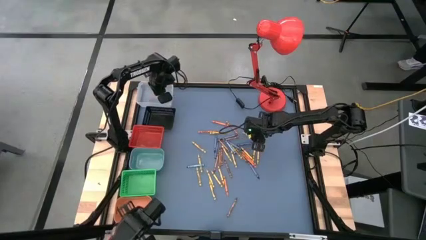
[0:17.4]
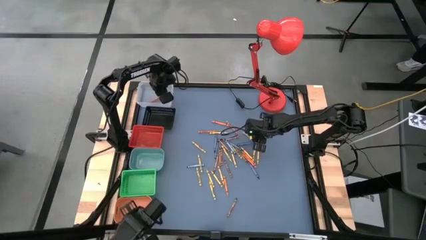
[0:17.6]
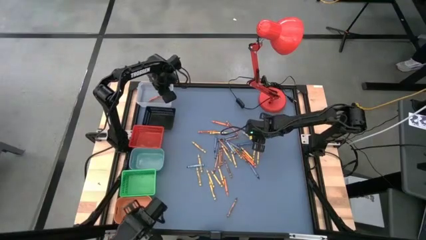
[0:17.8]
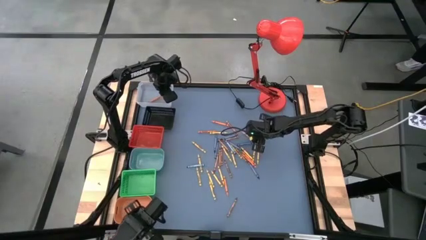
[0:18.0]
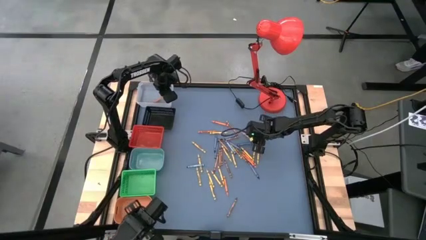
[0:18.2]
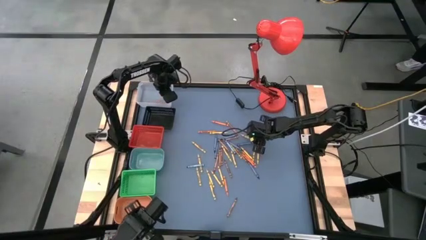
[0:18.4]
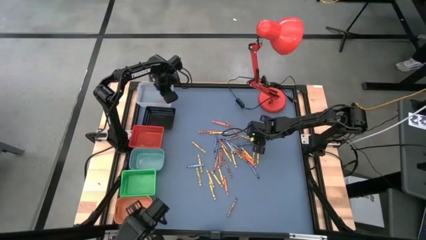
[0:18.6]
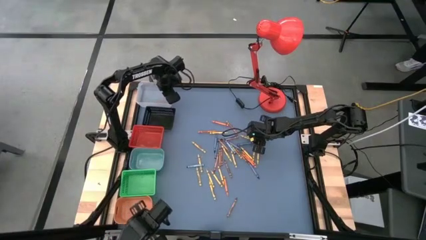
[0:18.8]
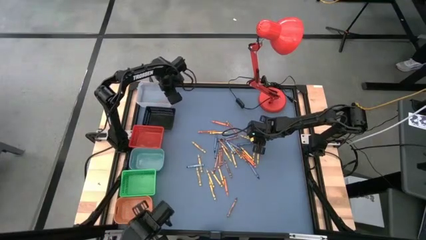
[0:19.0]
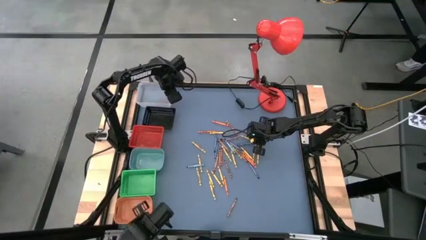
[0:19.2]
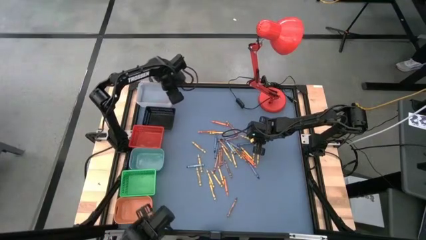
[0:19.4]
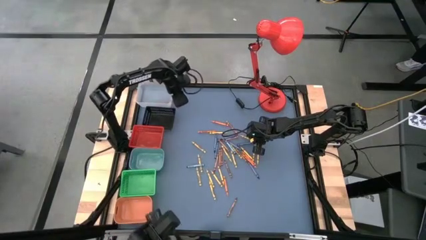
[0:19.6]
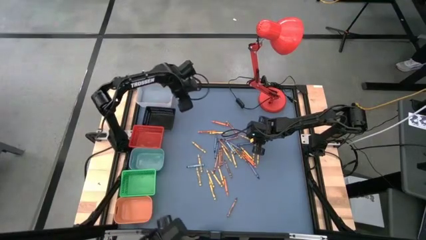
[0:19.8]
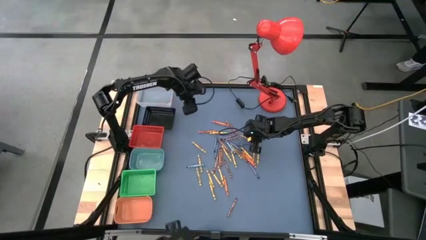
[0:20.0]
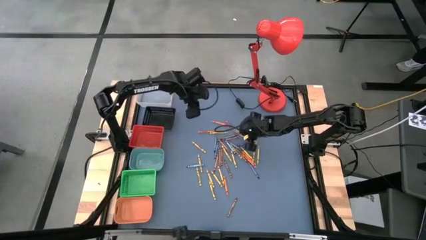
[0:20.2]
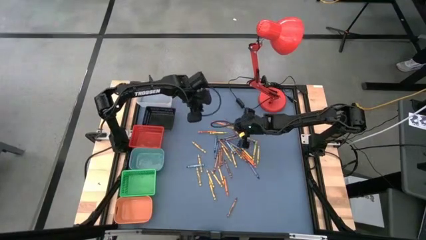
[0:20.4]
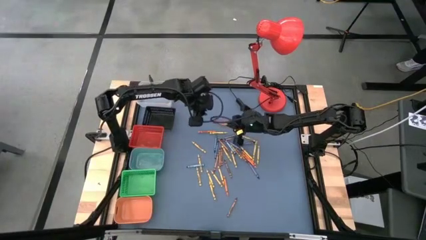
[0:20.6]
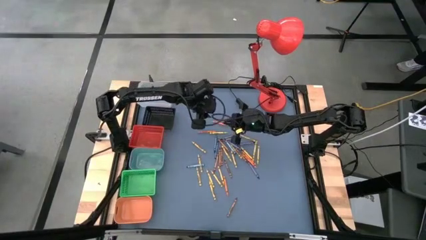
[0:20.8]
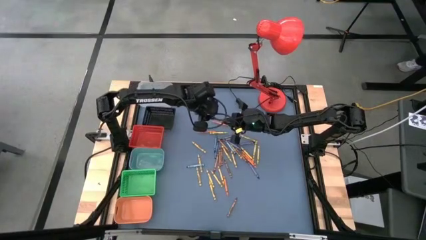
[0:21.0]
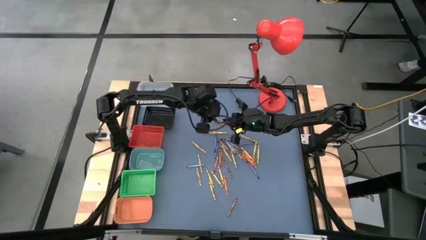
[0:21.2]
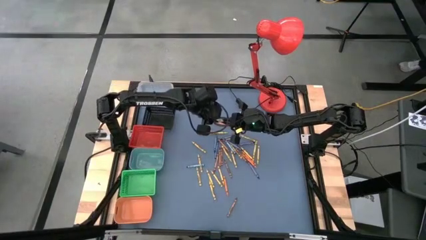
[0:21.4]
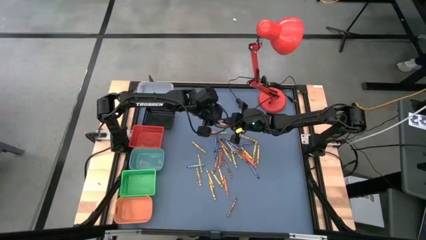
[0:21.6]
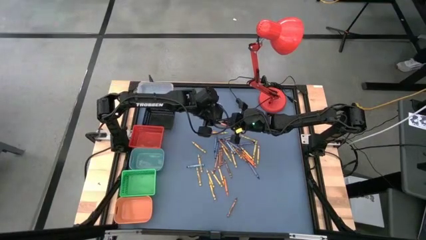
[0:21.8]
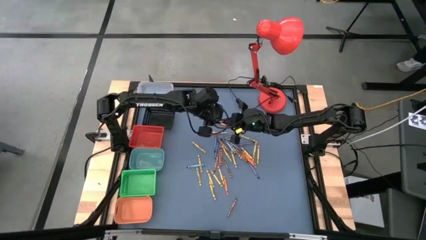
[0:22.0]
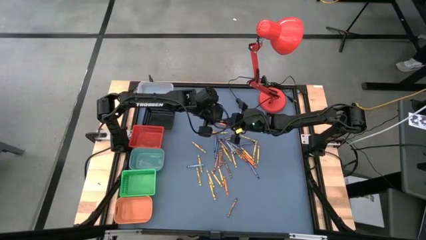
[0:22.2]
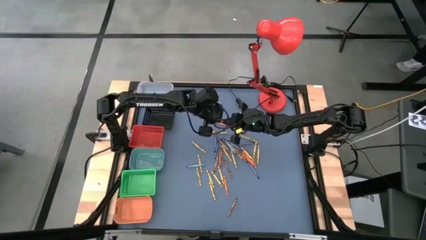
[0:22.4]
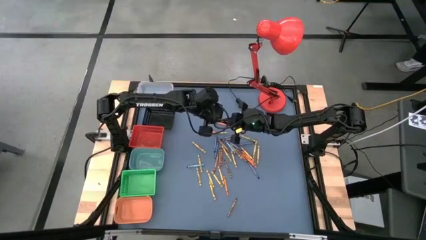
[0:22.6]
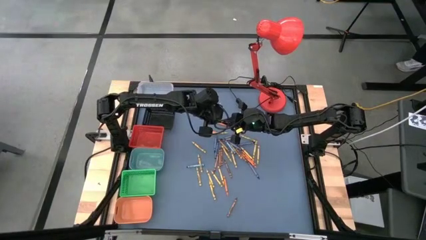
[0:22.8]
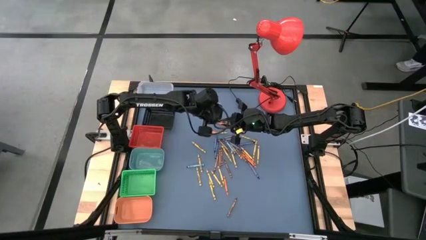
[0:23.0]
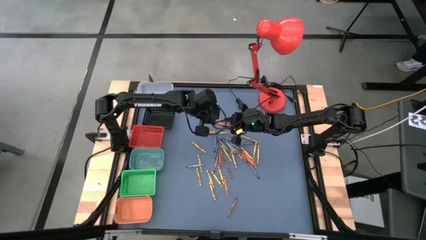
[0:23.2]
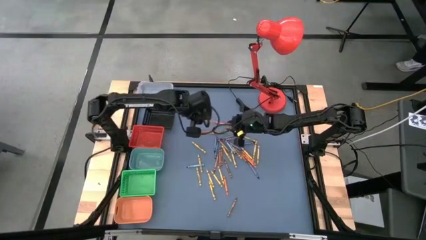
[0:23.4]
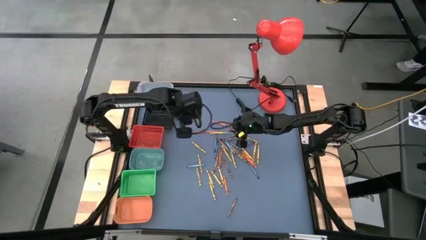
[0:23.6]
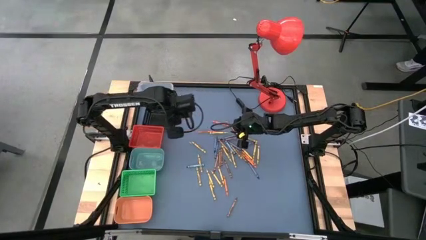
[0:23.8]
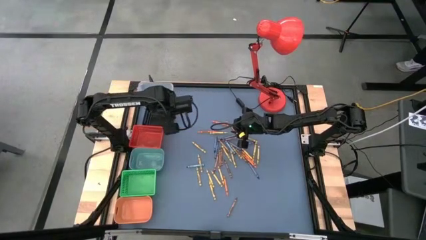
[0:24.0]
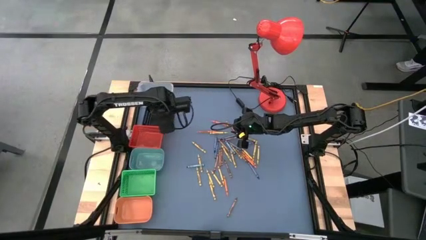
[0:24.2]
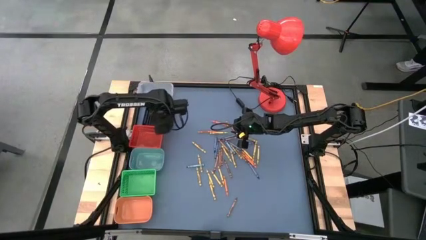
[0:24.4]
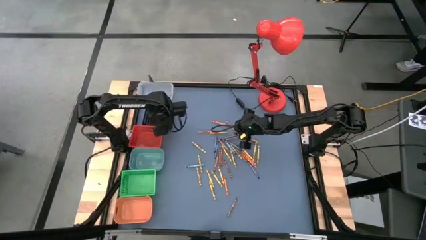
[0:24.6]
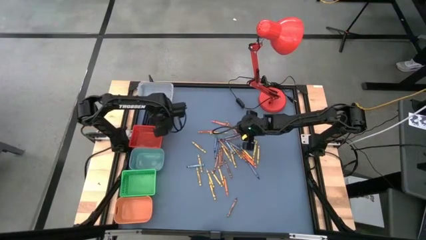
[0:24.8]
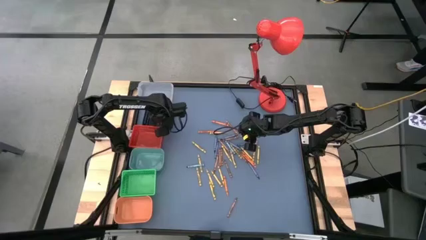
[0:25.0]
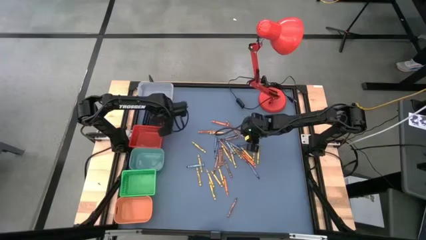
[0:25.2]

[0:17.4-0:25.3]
Task: Sort crayons
Put the green crayon into the black bin

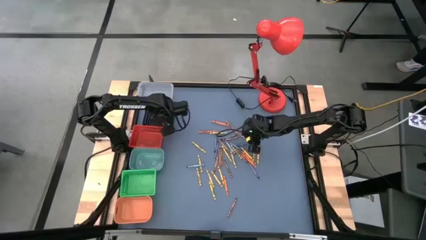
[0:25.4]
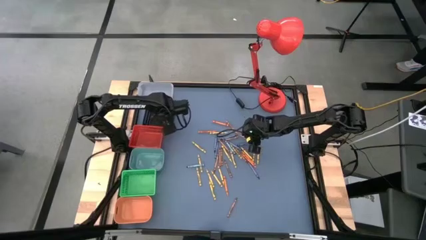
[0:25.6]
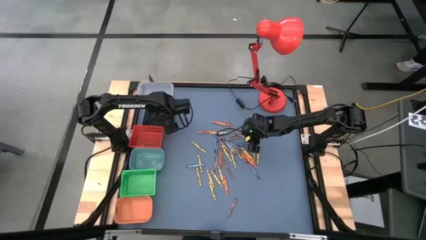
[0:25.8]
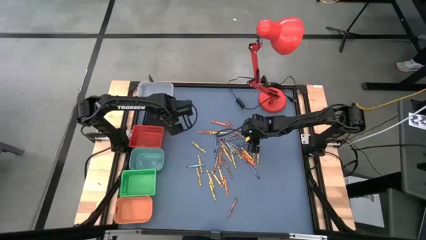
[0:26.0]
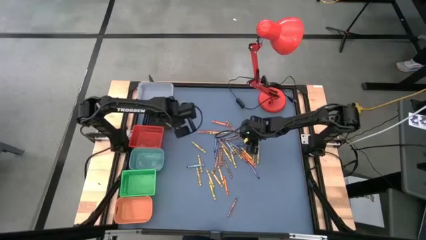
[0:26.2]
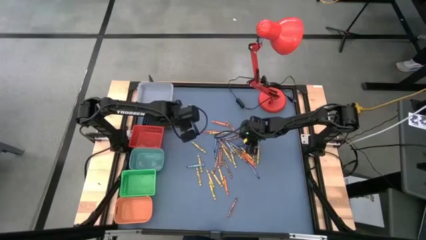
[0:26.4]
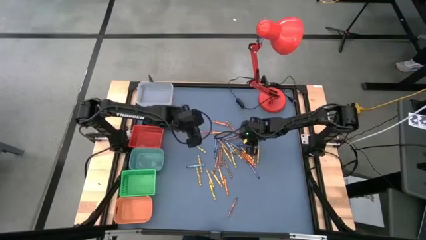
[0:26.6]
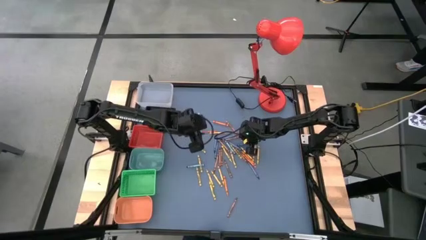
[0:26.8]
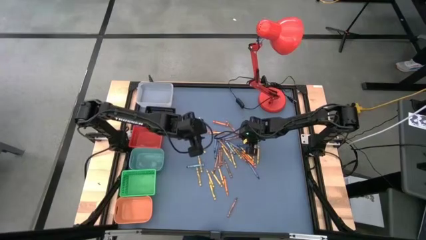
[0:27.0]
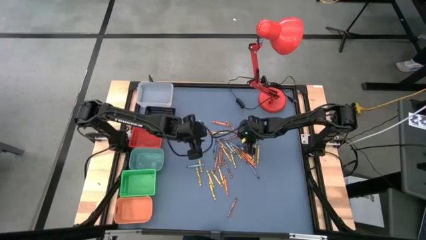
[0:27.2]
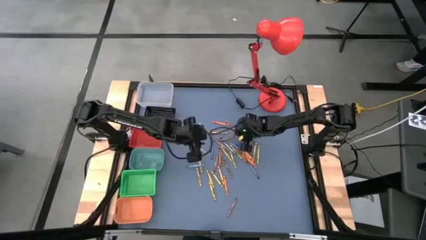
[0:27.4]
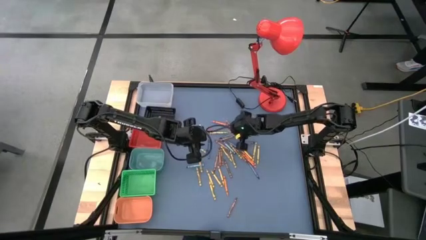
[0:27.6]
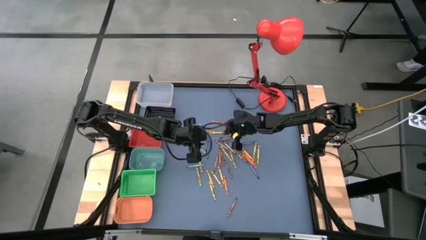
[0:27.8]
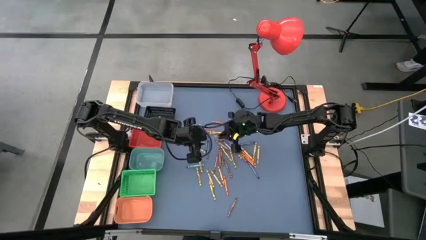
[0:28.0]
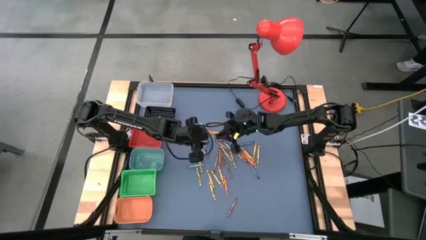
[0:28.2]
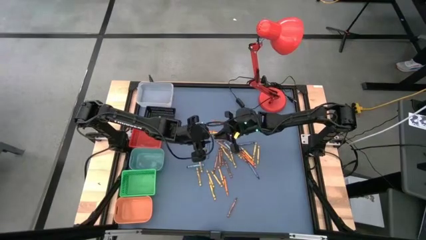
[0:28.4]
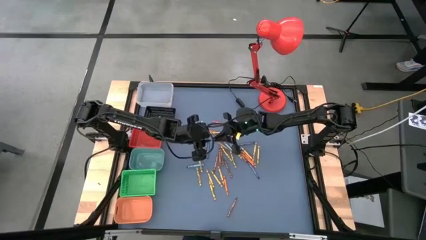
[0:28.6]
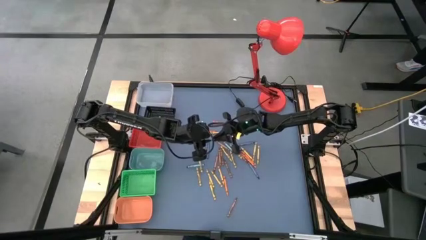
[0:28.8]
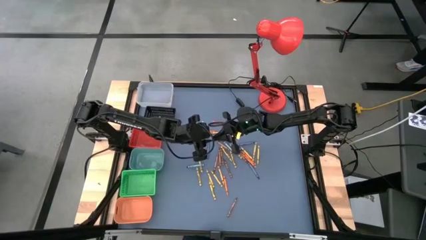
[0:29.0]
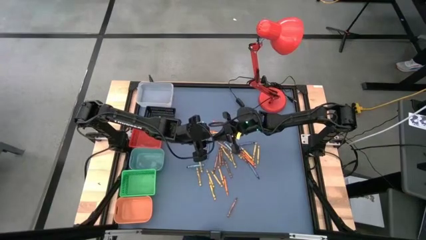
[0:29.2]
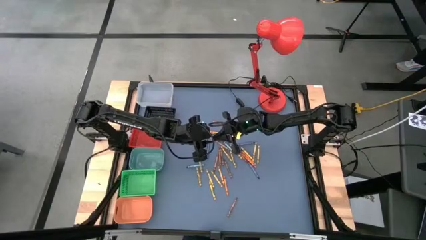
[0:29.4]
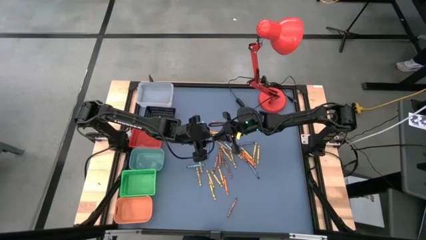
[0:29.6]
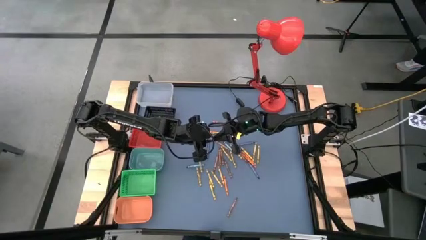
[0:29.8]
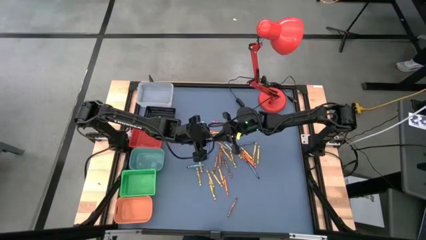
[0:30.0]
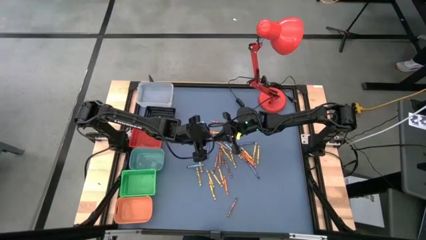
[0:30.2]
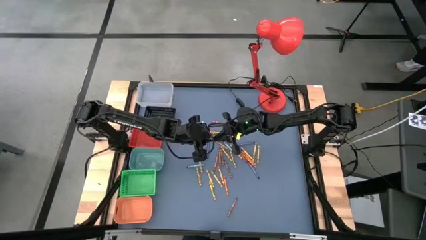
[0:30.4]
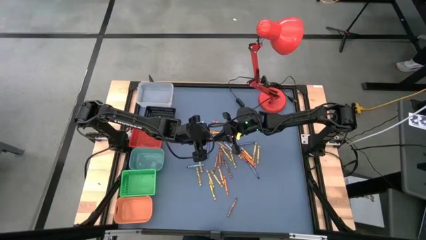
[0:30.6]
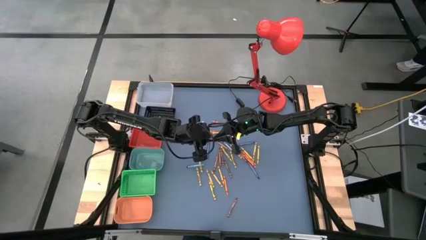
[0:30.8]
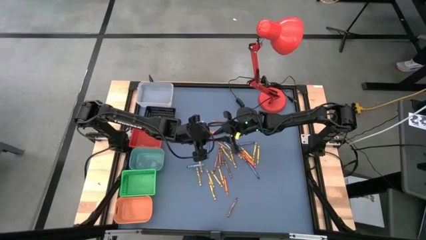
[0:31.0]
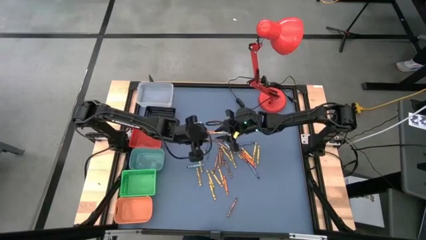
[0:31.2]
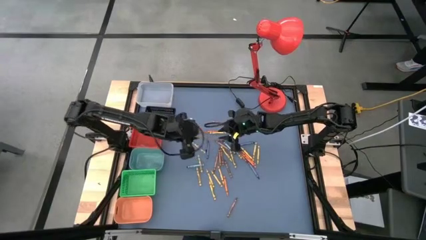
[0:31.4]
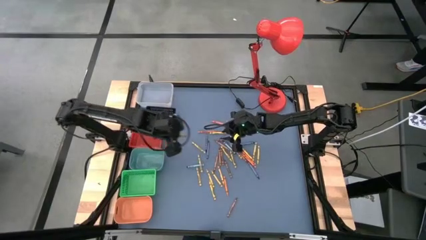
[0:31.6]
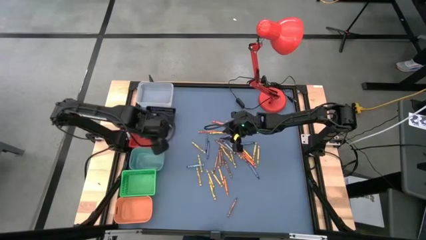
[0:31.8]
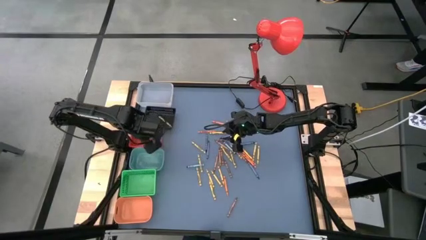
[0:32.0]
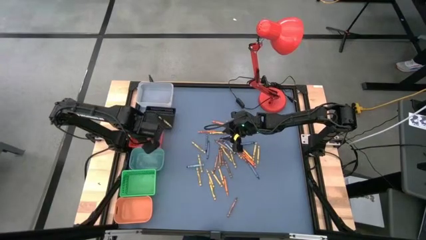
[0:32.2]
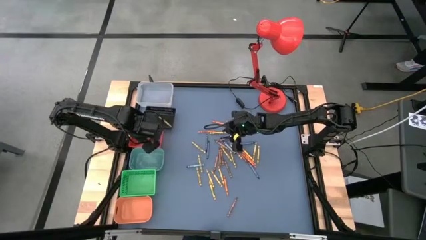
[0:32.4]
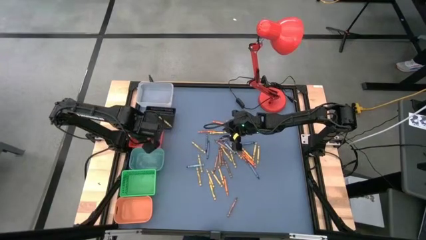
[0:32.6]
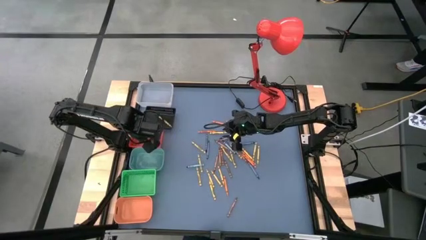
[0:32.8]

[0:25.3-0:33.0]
Put the yellow into the orange bin

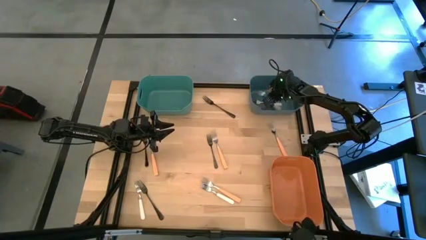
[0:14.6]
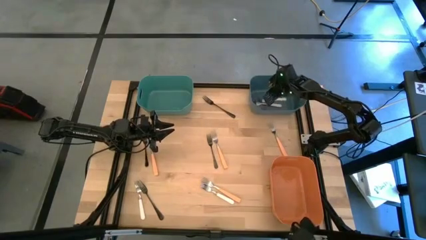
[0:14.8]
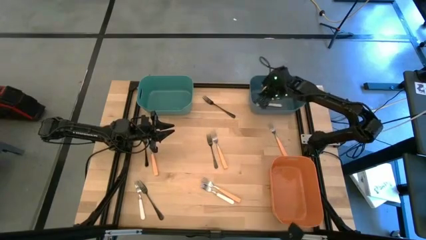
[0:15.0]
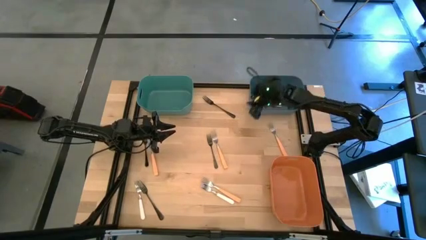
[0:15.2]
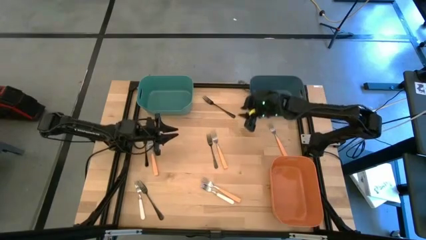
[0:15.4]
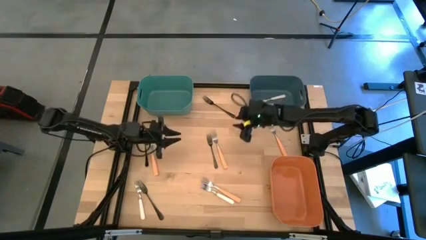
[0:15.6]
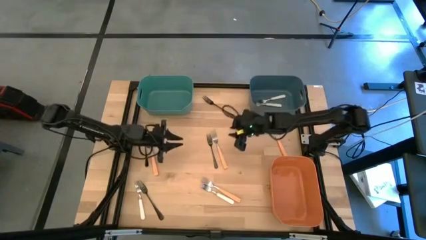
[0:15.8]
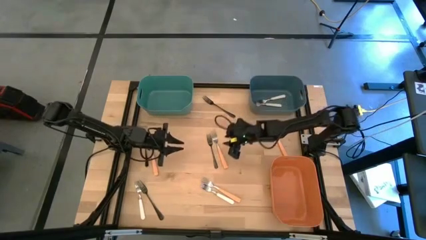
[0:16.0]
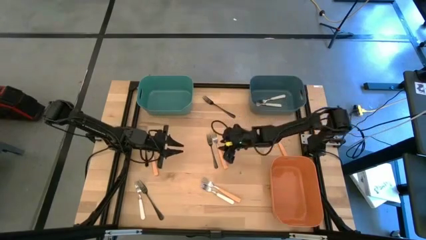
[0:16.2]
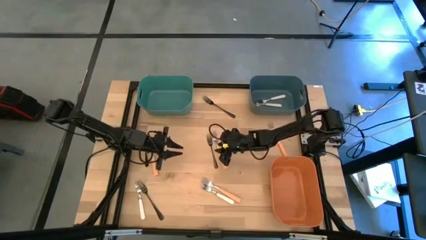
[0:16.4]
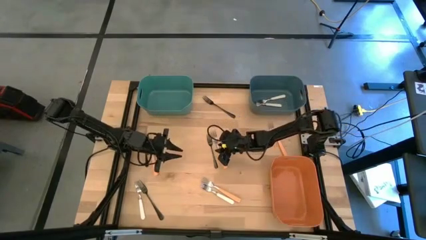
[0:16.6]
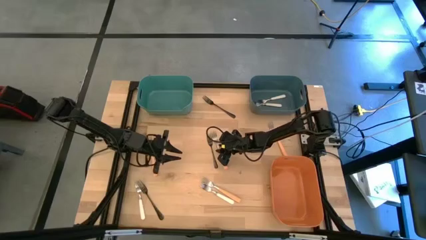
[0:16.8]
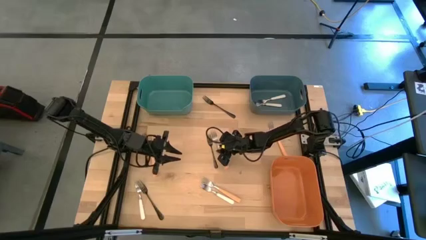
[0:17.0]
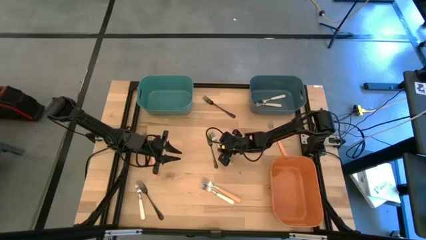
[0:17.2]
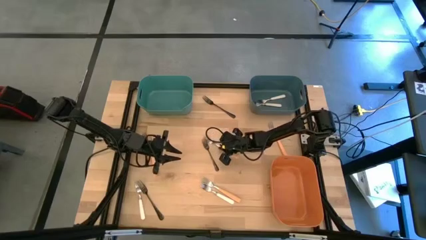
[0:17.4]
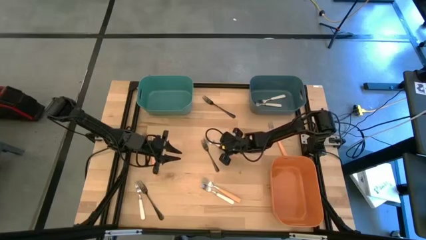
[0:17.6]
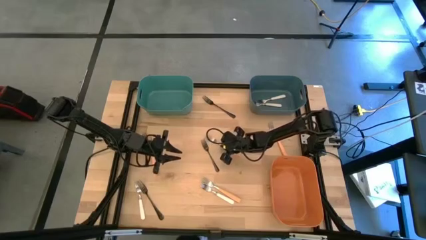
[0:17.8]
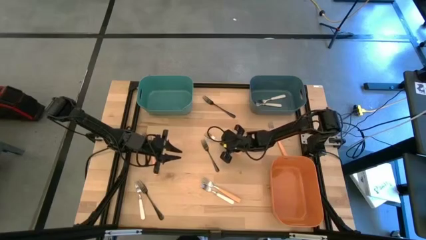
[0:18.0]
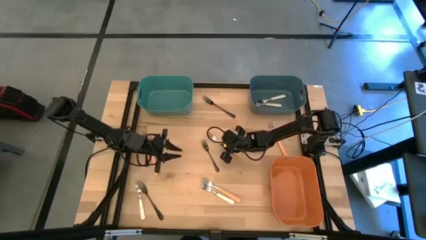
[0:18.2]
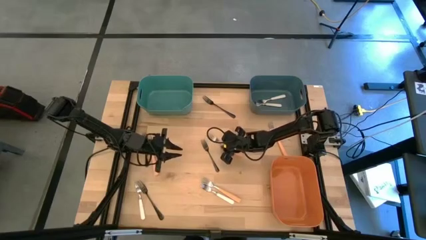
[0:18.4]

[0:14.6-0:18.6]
Task: Sort silverware by color (type)
Put the browm fork into the bin
